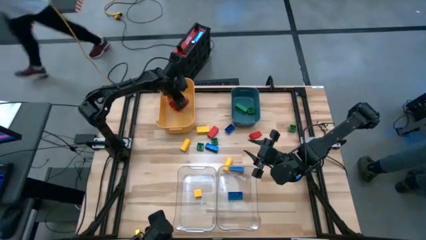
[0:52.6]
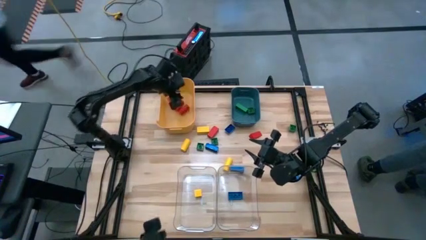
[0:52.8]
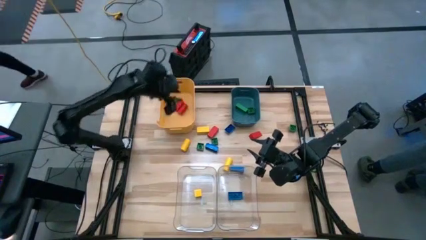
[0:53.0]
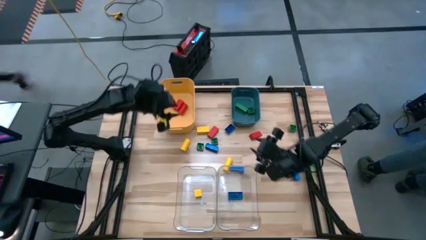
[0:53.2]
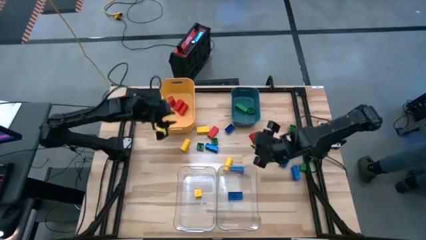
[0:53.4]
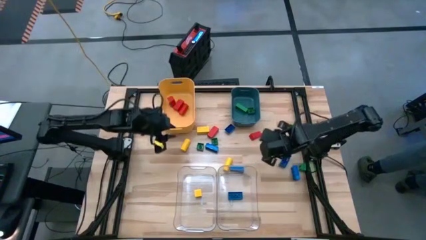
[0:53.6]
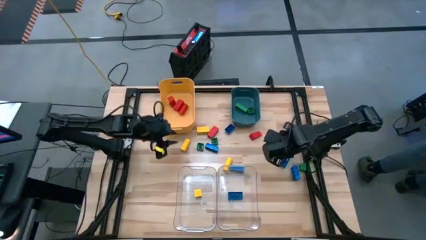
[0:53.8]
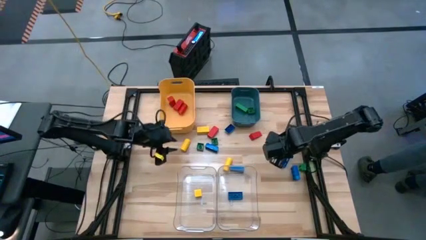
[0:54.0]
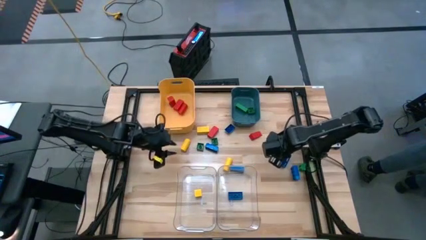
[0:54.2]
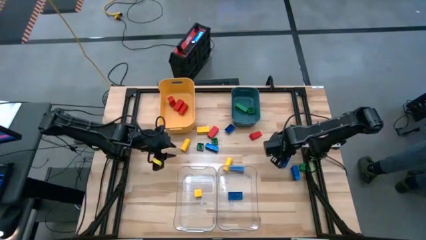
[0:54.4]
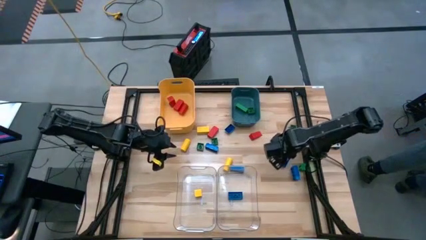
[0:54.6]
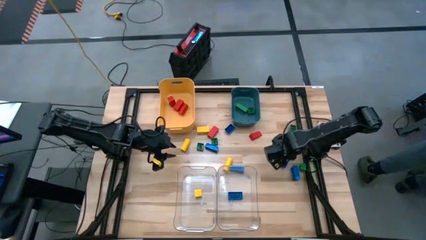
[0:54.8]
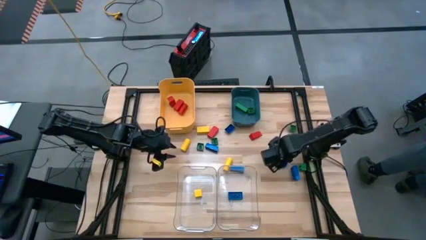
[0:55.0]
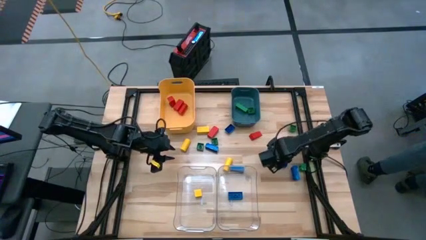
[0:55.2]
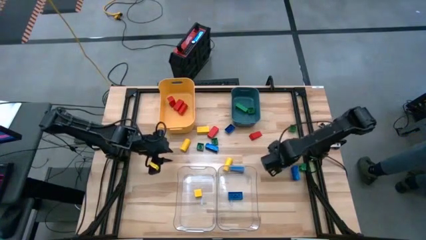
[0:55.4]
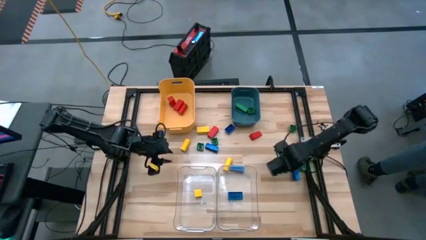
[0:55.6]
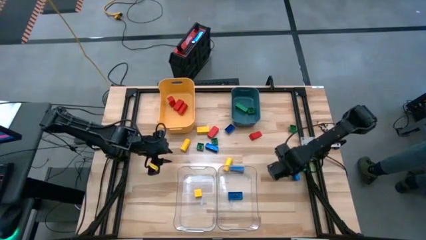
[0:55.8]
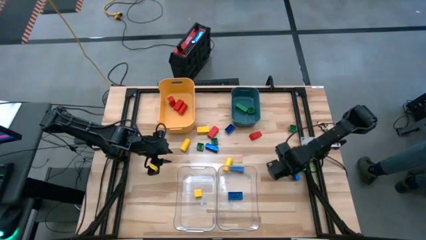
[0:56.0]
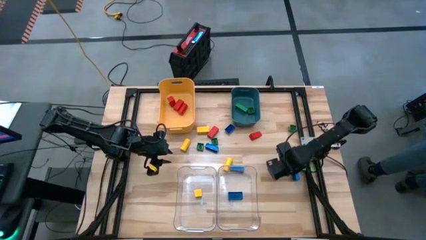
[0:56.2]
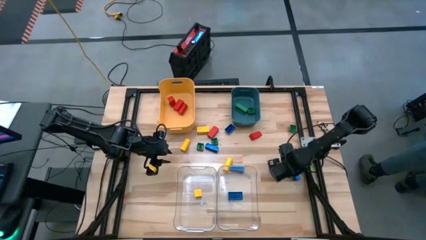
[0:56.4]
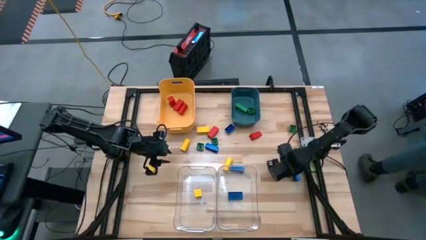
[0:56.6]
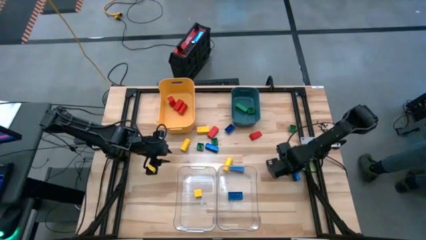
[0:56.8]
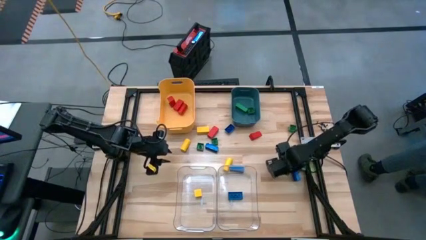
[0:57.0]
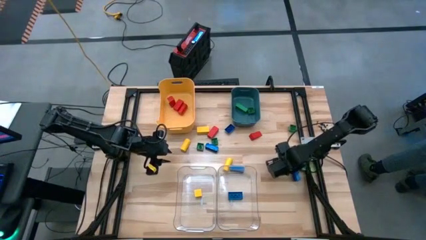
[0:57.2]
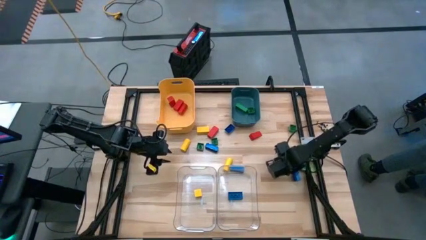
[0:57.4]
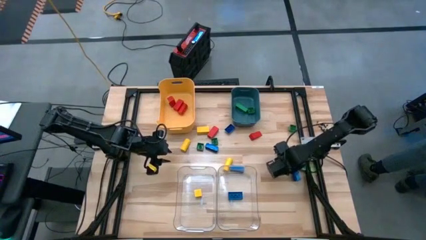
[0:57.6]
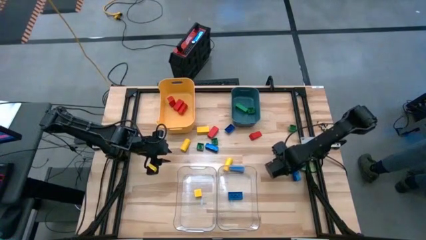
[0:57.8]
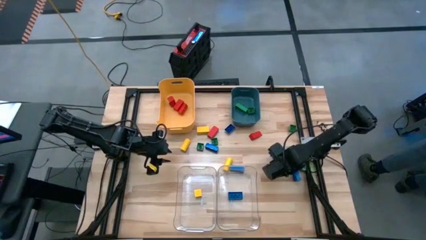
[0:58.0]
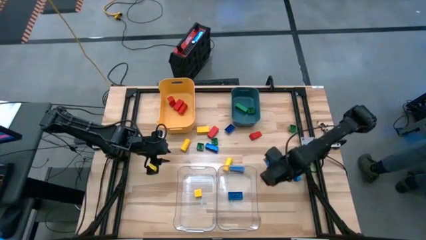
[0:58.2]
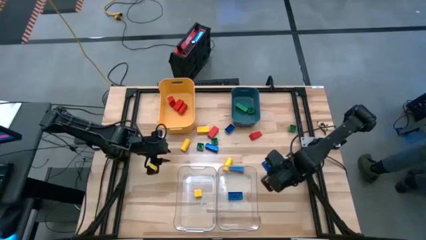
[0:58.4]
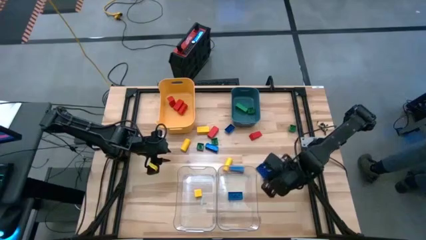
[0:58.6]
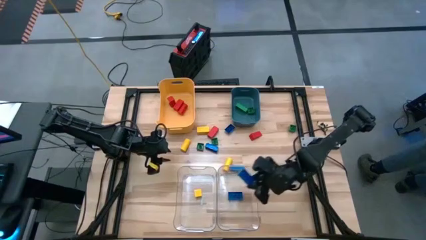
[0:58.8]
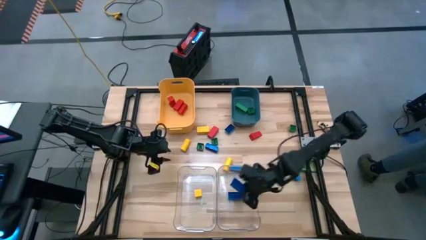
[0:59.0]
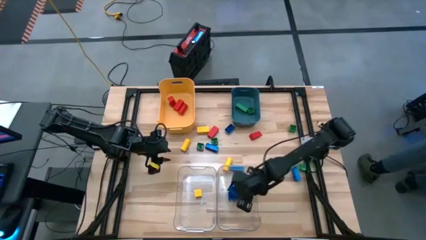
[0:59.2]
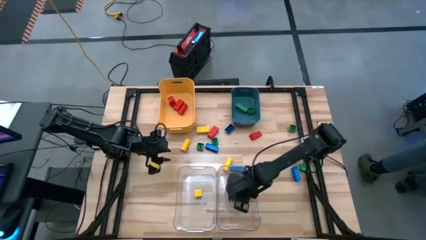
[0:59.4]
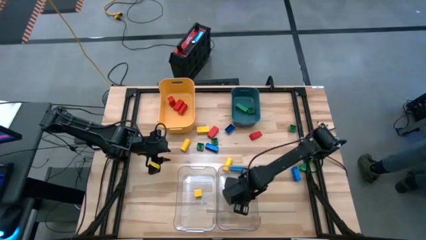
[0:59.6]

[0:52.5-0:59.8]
Task: Sort blocks
Put the blue game piece into the right transparent bin

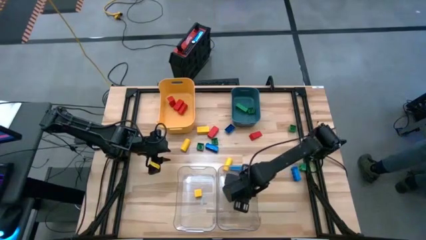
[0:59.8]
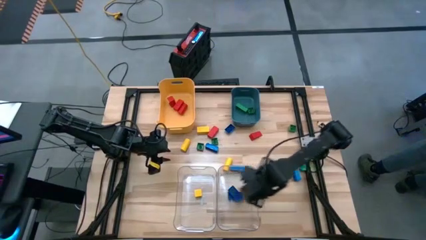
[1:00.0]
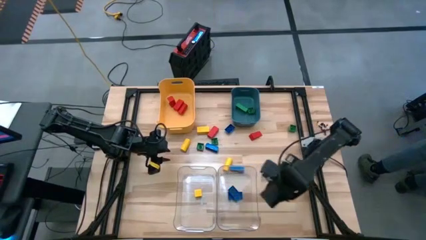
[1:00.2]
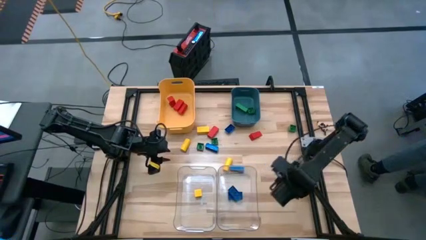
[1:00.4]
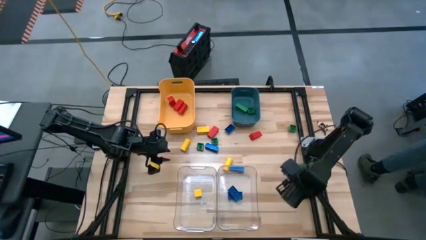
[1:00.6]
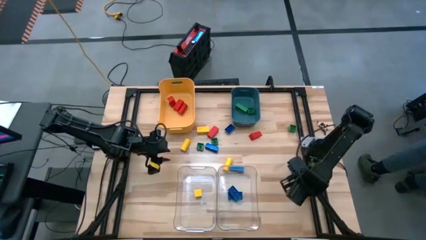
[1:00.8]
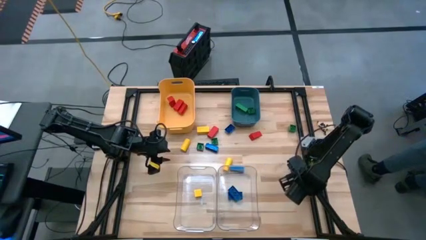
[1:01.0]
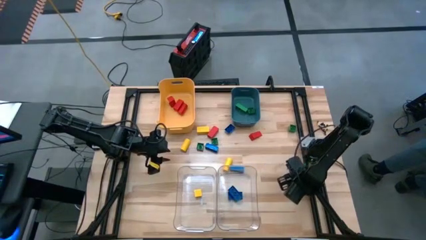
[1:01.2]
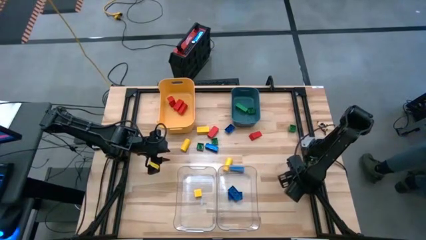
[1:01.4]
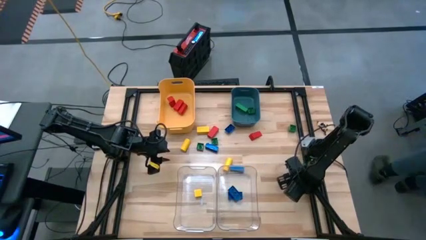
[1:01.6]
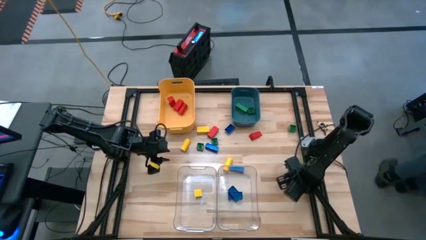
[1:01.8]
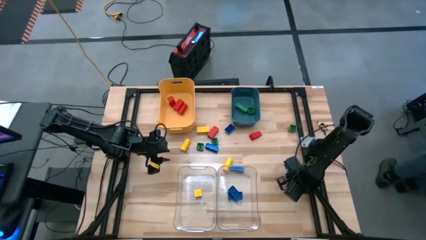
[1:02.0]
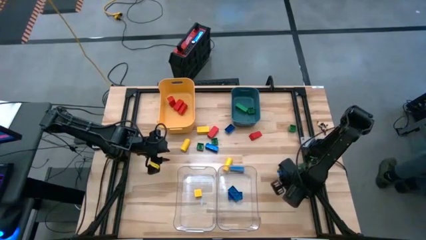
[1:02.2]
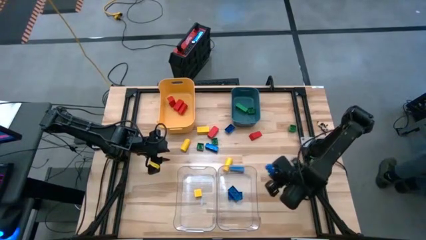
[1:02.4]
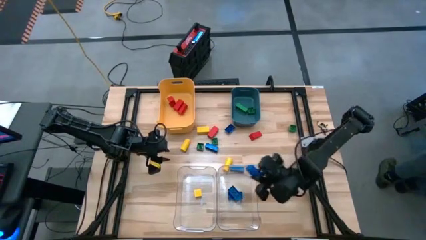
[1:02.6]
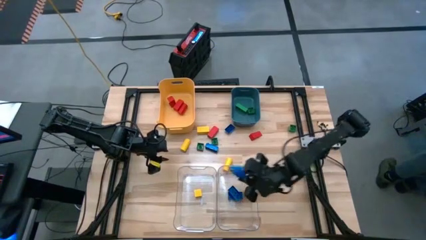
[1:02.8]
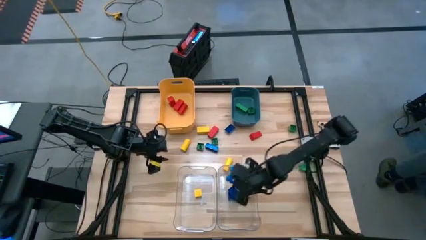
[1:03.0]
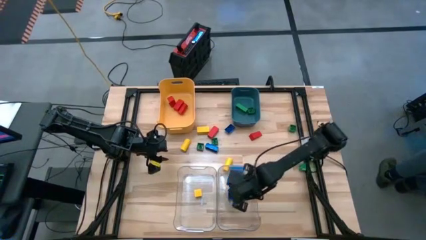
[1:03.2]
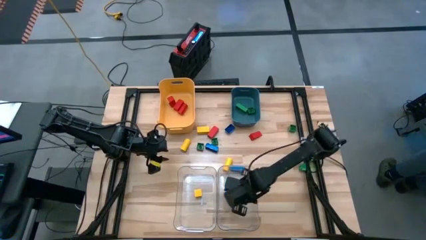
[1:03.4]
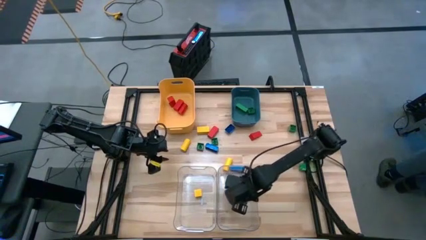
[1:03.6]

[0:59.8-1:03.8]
Put the blue game piece into the right transparent bin

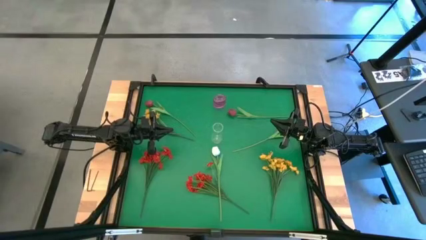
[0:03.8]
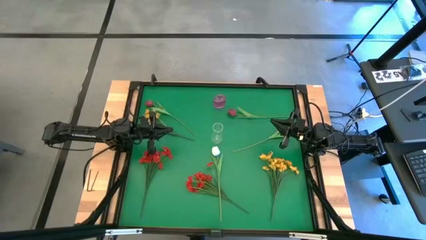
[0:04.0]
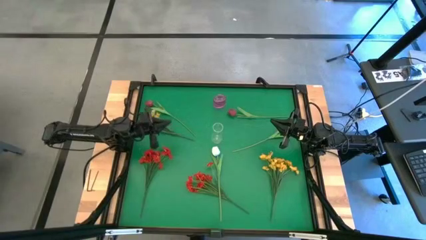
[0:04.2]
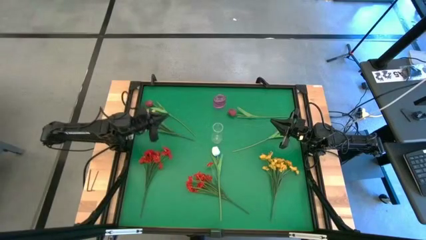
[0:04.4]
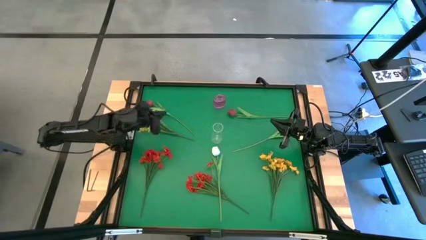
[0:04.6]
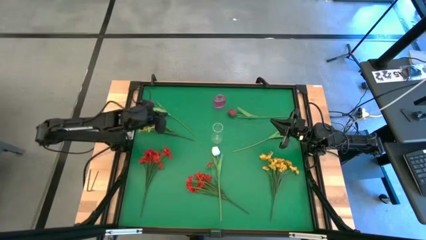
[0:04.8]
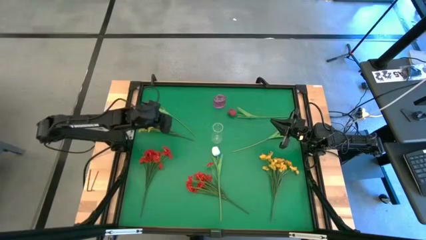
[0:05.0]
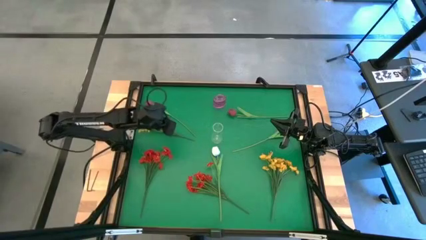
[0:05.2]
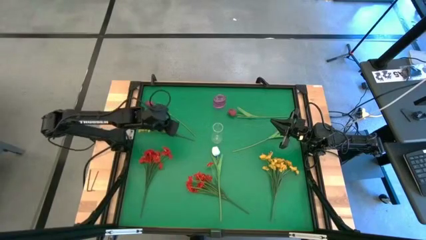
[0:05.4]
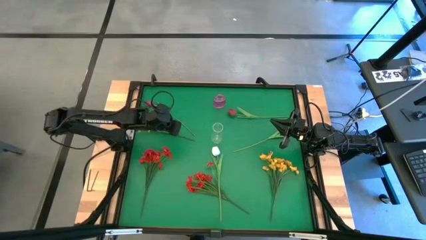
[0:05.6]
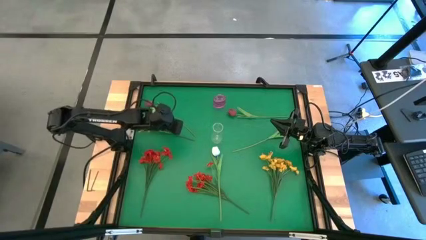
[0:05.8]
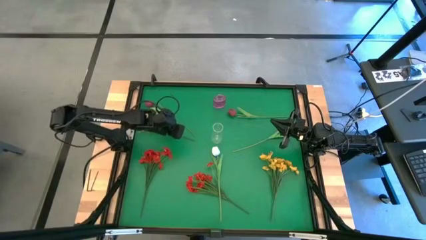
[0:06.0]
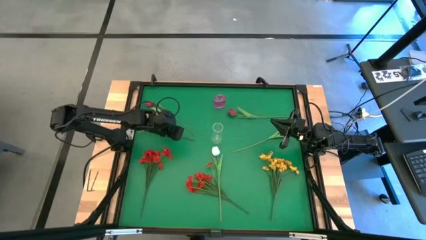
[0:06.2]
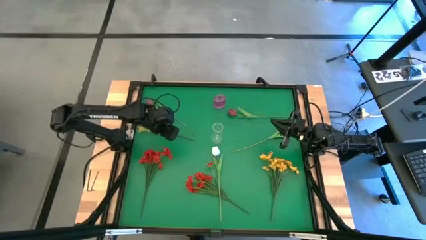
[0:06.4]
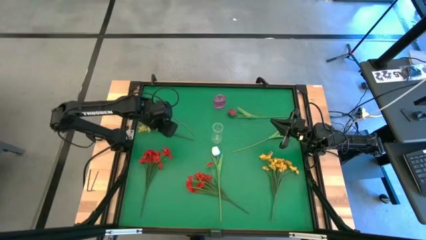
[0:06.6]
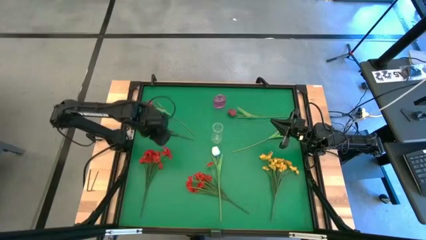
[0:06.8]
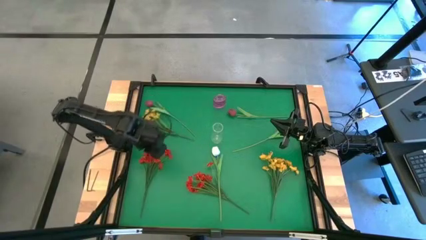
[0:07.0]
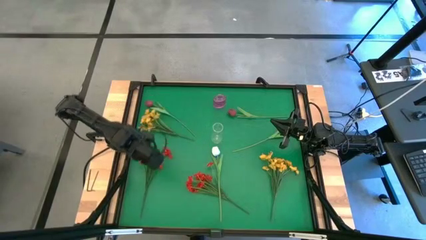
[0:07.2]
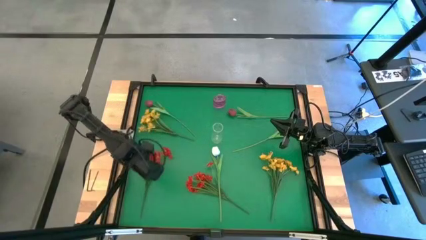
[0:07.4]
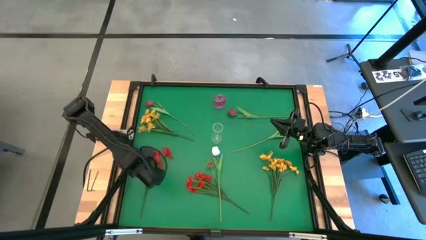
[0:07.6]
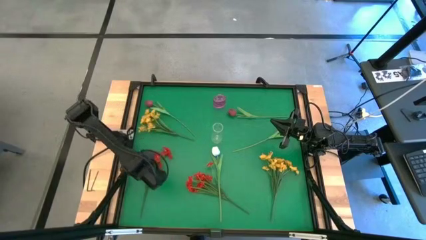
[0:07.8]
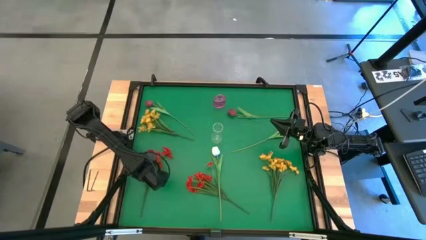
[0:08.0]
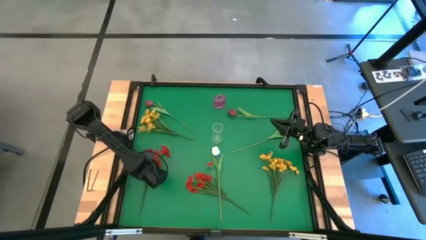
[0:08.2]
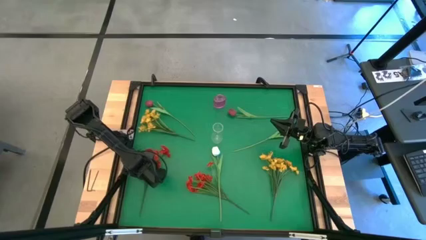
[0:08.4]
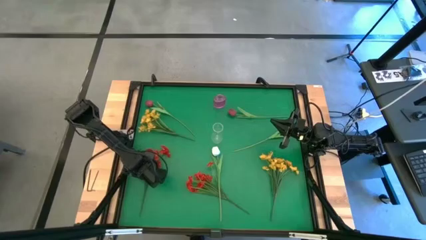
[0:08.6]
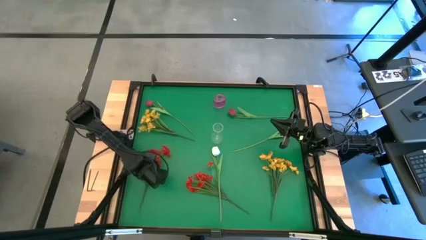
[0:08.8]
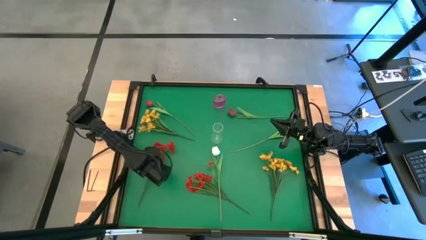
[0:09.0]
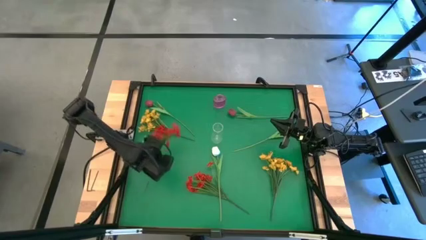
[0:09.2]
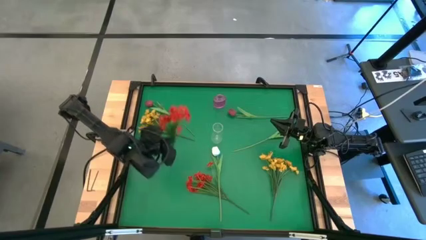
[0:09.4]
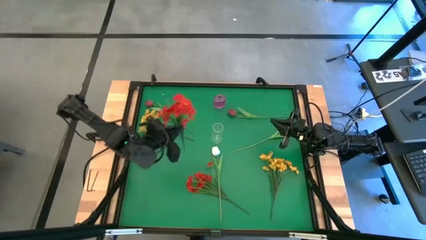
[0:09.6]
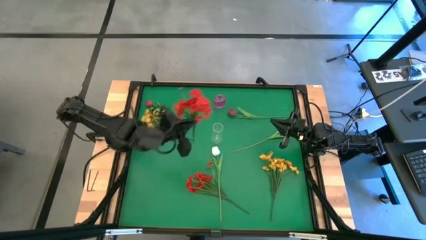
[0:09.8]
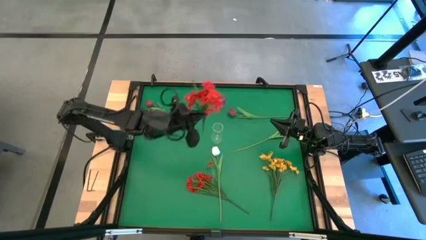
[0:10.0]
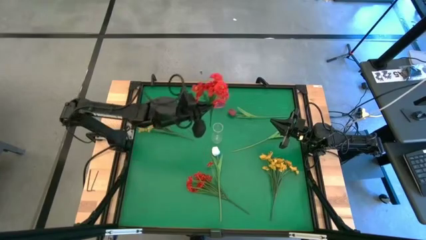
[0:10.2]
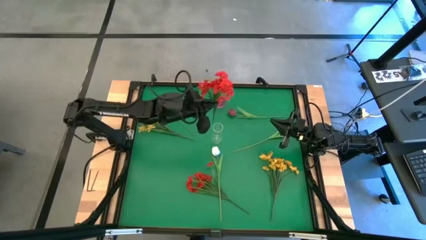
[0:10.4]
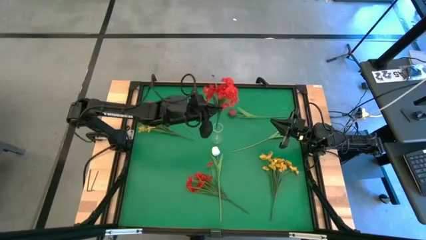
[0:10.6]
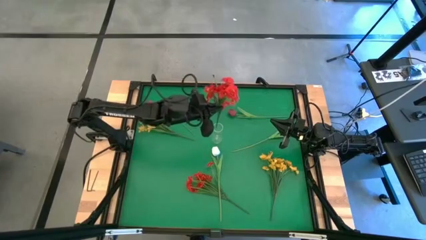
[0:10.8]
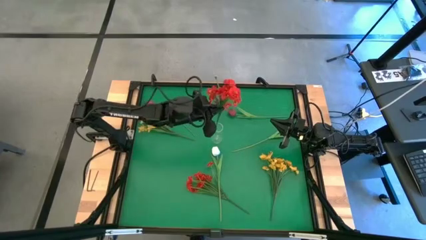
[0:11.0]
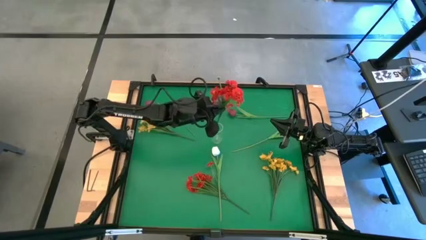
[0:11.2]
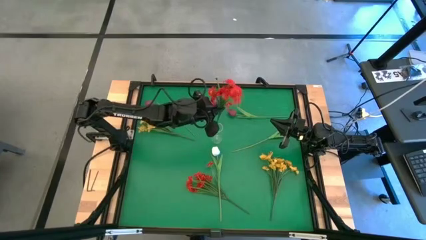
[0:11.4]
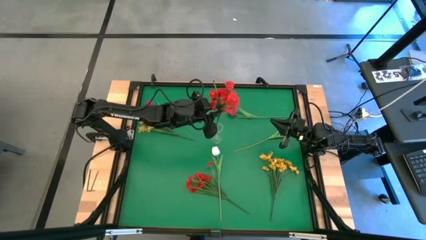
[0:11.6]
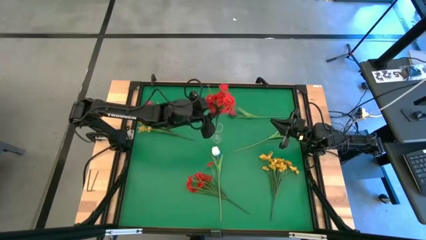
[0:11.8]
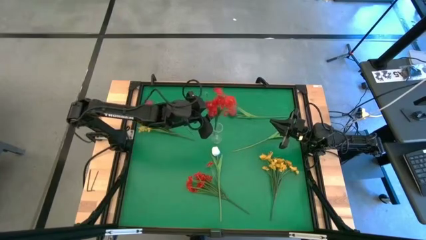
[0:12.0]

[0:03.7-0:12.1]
Task: Sort flowers into vase by color
Put the left orange flower into the transparent vase
